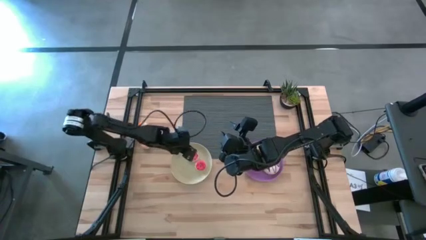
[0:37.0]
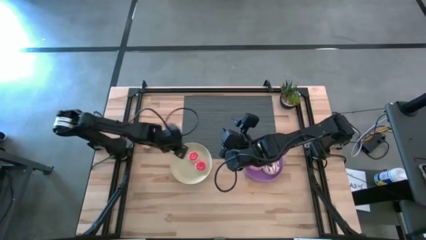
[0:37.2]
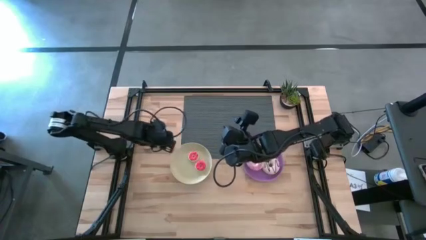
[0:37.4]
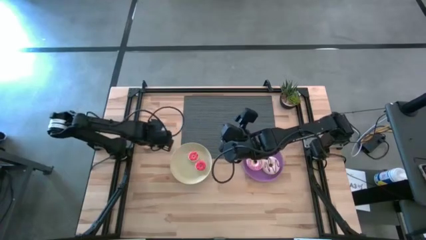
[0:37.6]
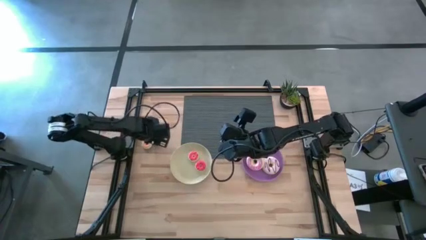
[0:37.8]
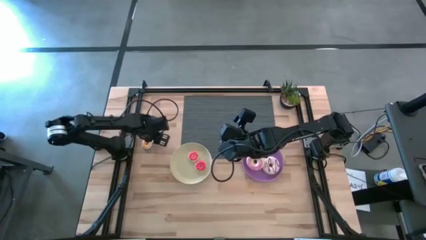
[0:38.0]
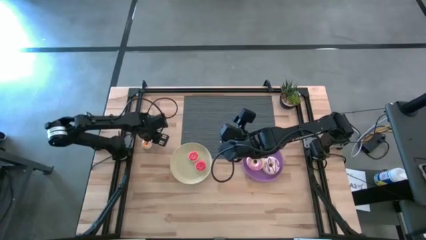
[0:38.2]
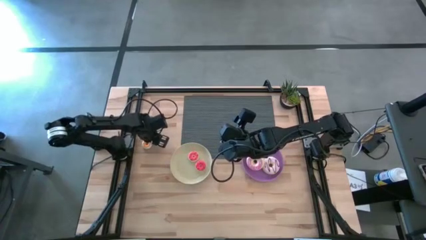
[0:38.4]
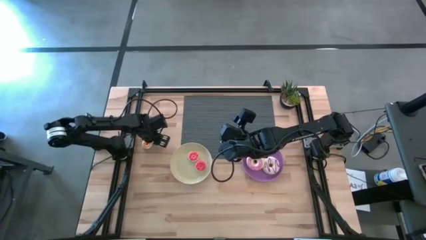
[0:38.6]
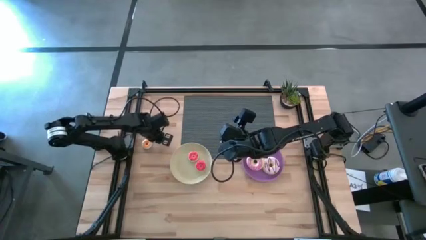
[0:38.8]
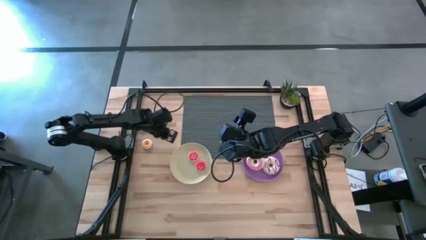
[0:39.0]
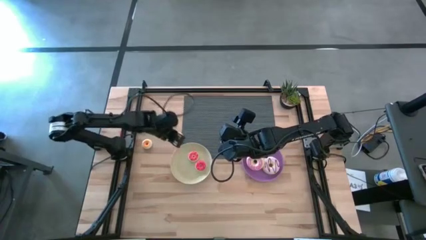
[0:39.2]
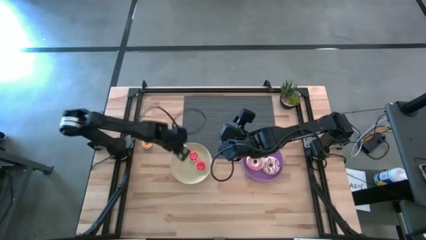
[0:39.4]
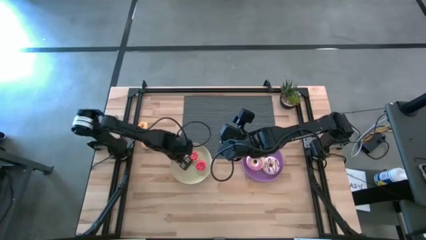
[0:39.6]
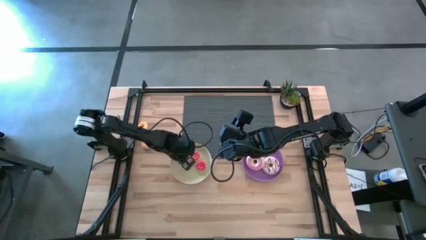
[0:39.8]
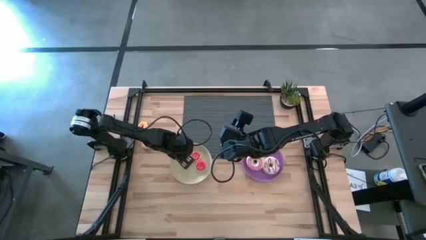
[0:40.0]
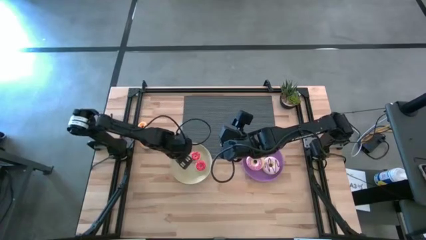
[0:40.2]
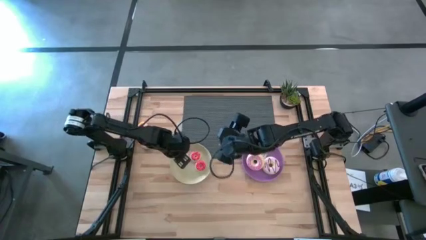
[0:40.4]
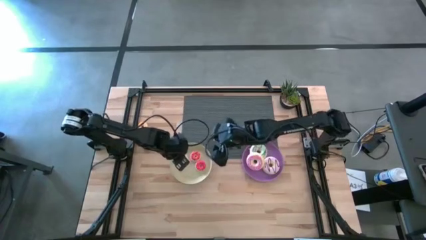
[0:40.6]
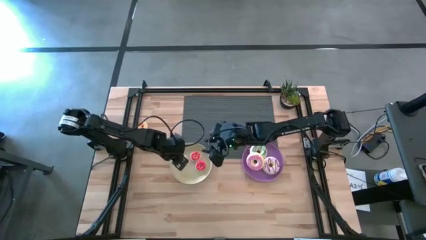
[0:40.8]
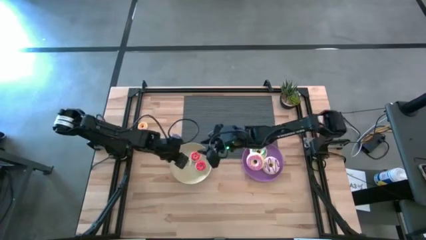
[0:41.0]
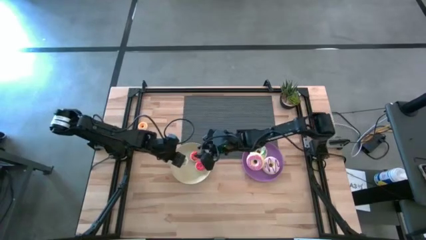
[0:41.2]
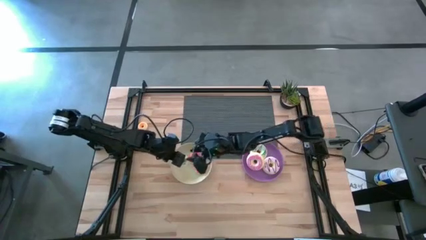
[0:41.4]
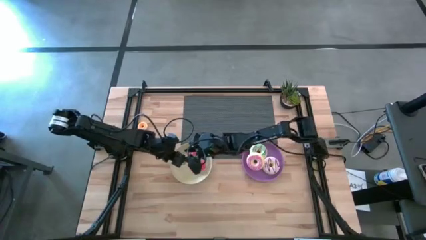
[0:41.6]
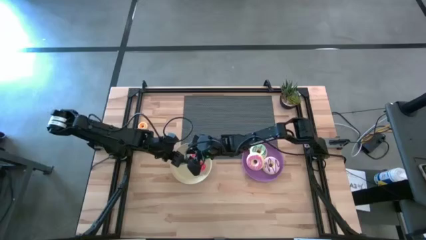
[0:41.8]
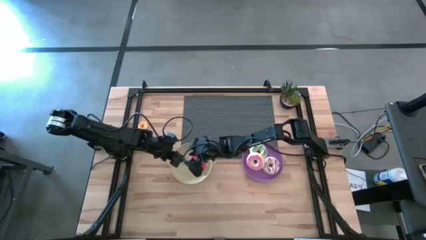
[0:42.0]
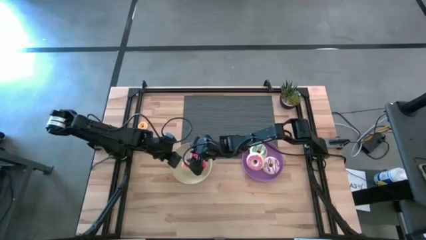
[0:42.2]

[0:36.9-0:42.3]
Task: Pick & Place donuts
Put the small white donut on the white plate

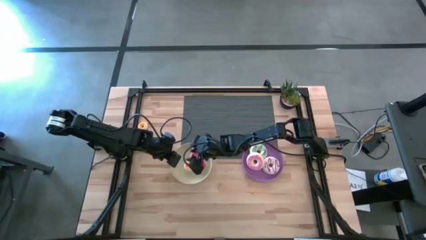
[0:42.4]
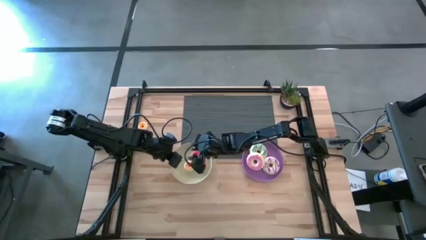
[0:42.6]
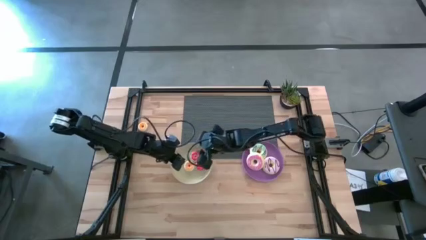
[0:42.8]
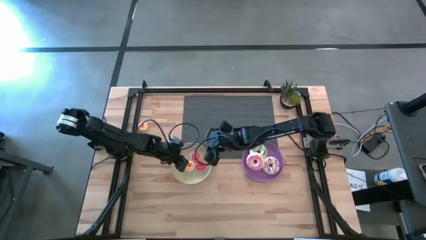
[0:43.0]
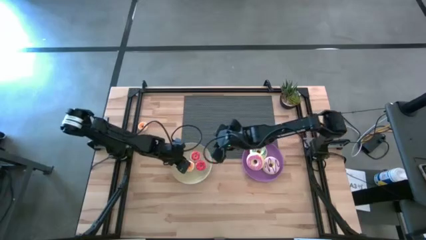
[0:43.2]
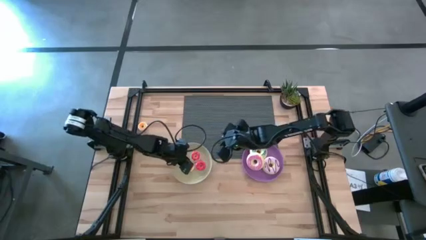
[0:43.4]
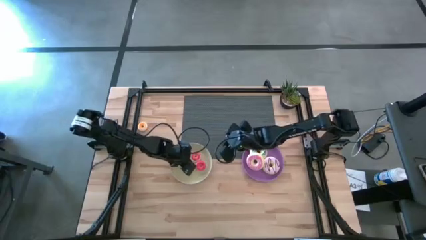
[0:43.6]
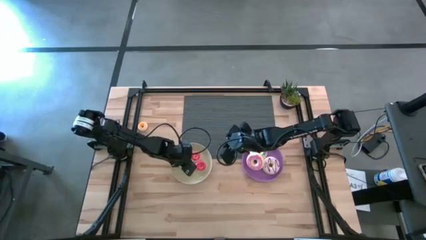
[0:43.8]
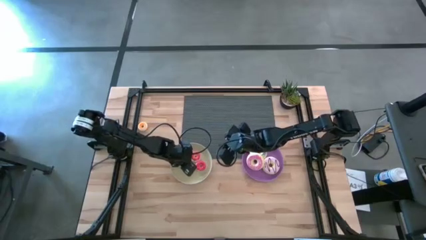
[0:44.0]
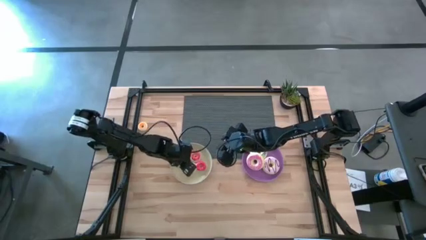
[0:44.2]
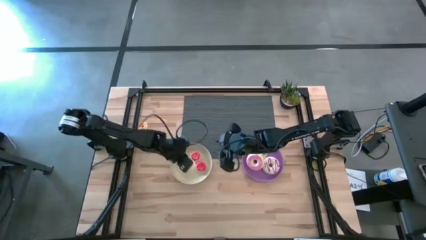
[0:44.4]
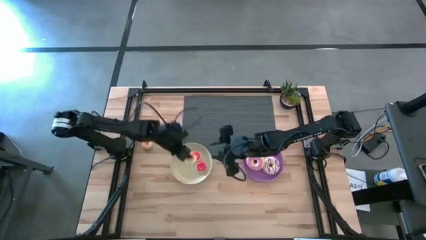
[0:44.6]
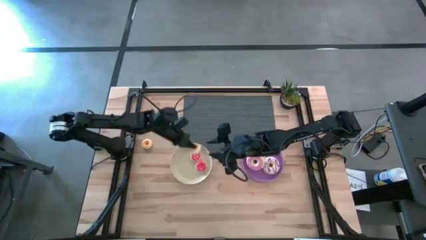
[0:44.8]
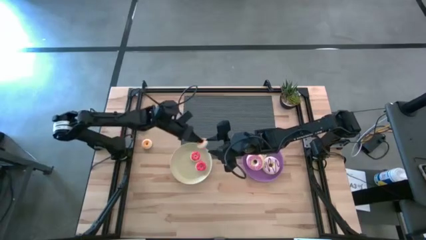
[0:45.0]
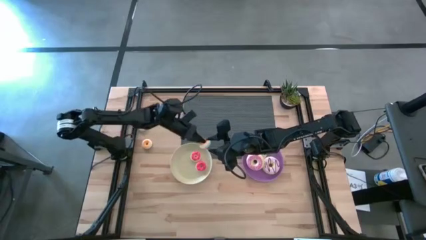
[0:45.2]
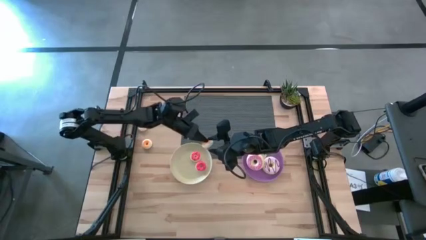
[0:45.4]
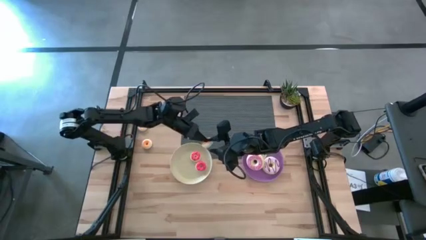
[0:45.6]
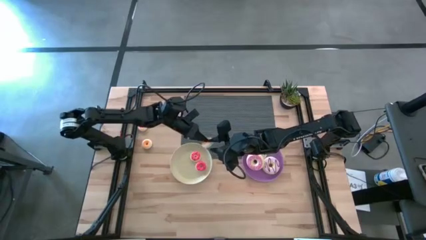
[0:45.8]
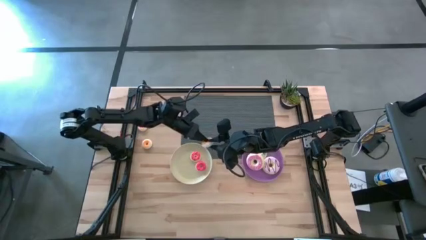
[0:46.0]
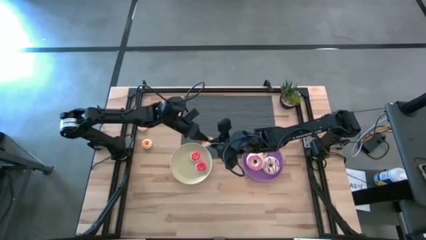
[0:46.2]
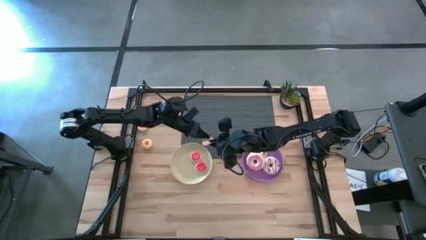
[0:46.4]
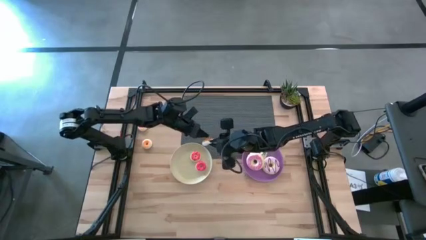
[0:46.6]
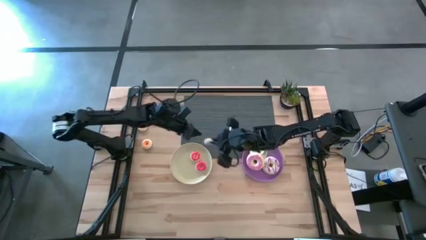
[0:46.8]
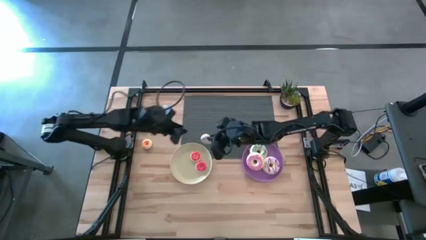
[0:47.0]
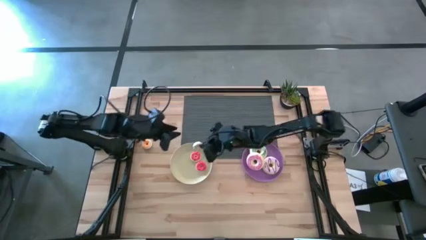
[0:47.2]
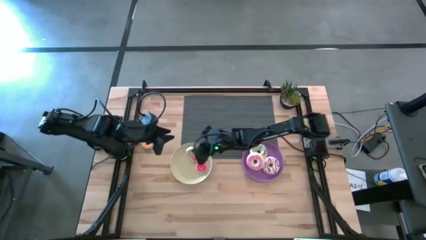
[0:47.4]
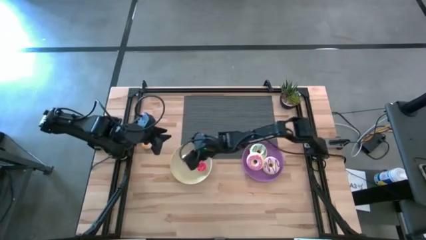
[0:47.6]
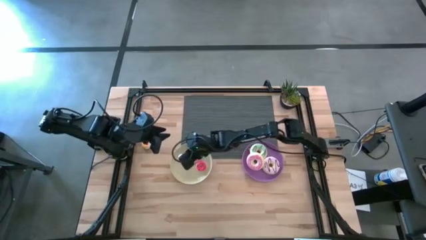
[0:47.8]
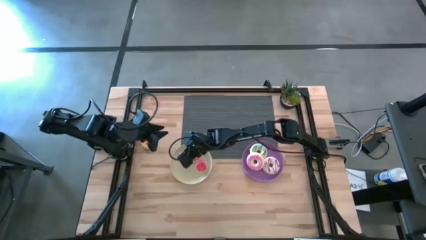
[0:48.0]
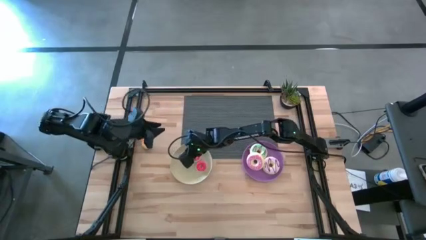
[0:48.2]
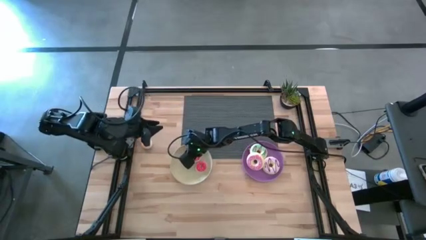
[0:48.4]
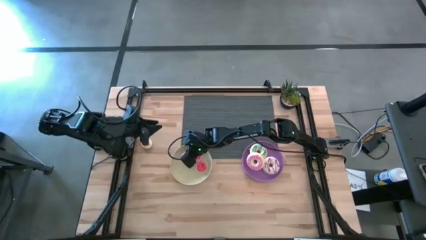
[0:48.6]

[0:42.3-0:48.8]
Put the small white donut on the white plate

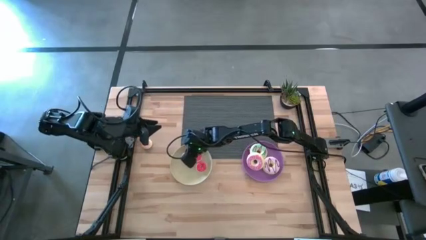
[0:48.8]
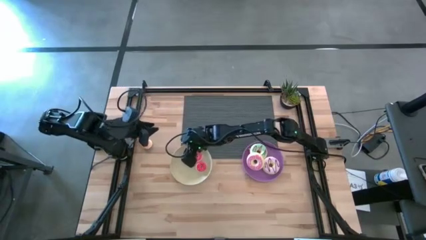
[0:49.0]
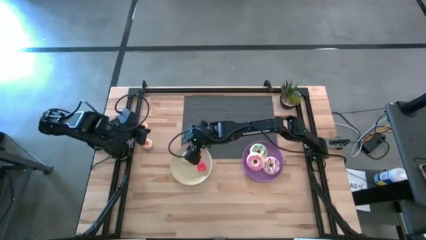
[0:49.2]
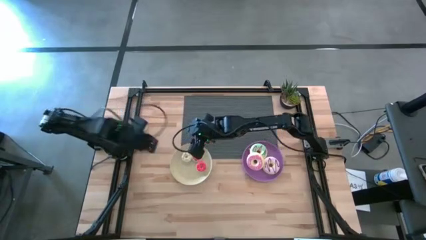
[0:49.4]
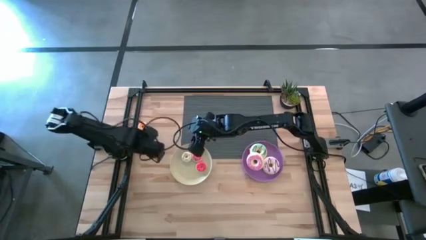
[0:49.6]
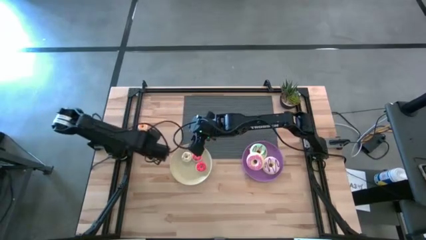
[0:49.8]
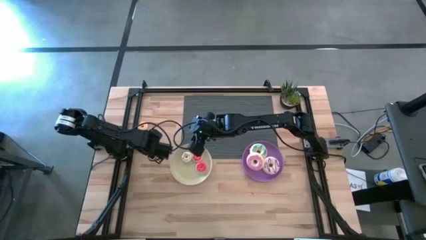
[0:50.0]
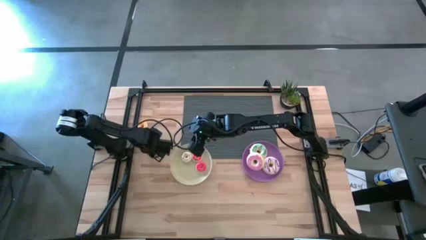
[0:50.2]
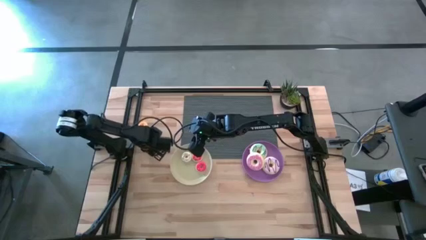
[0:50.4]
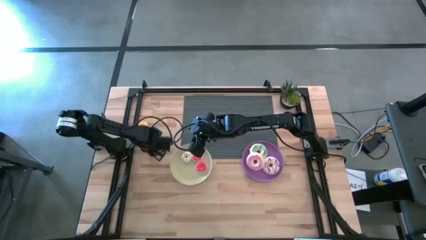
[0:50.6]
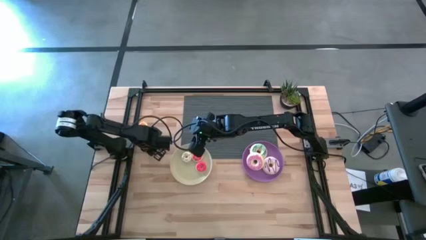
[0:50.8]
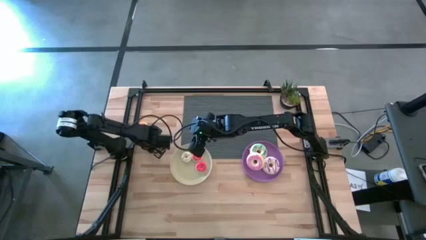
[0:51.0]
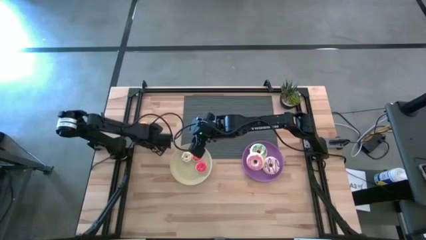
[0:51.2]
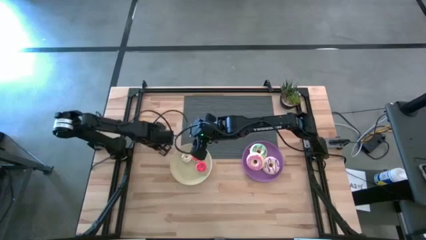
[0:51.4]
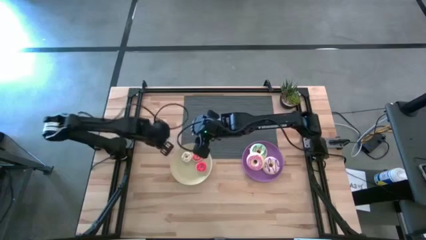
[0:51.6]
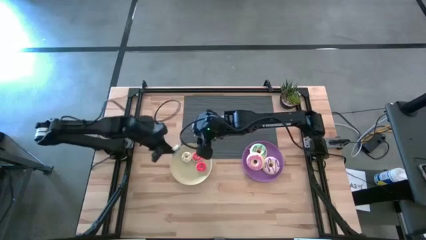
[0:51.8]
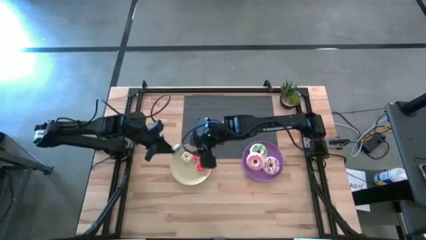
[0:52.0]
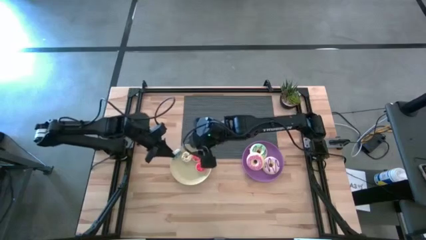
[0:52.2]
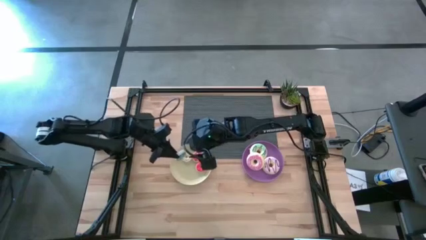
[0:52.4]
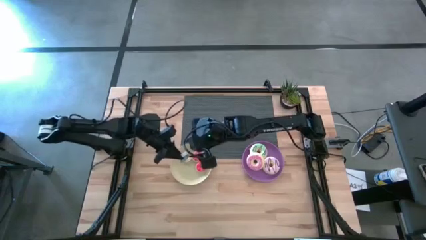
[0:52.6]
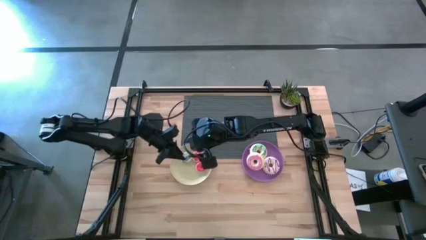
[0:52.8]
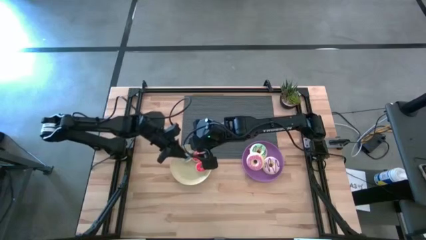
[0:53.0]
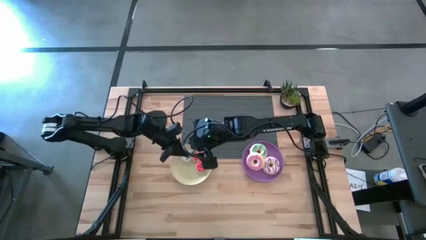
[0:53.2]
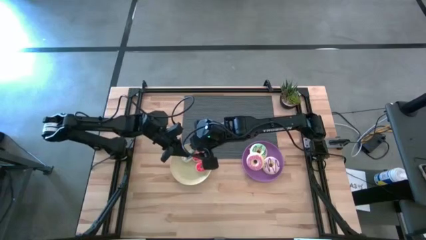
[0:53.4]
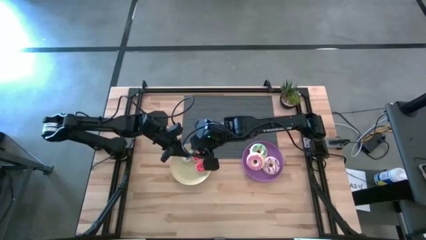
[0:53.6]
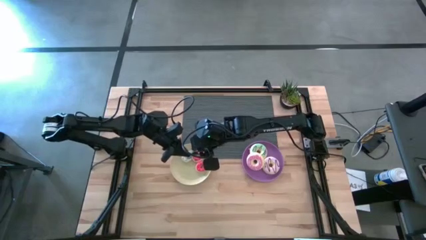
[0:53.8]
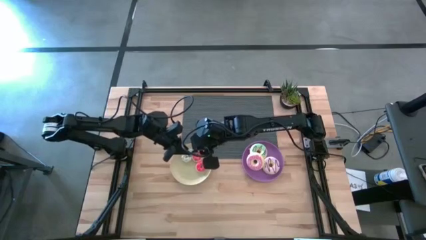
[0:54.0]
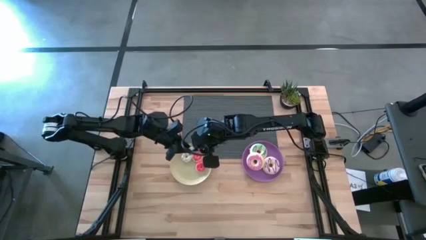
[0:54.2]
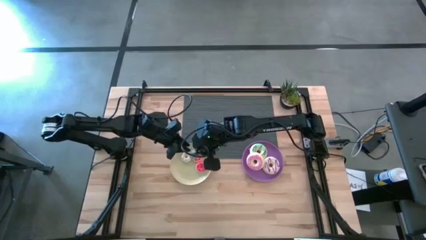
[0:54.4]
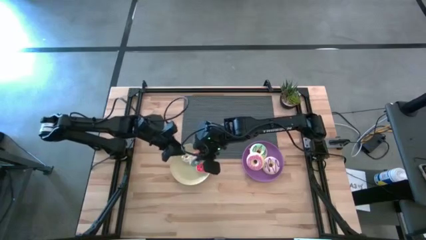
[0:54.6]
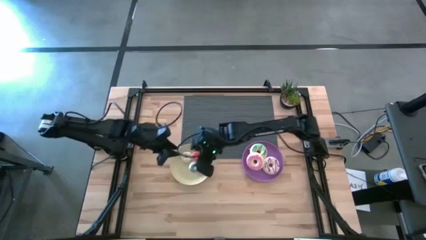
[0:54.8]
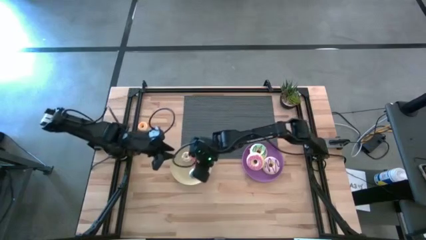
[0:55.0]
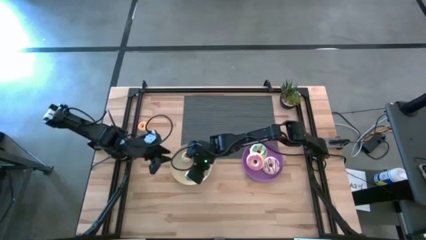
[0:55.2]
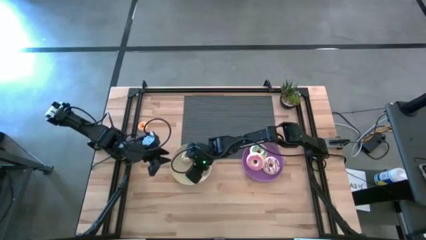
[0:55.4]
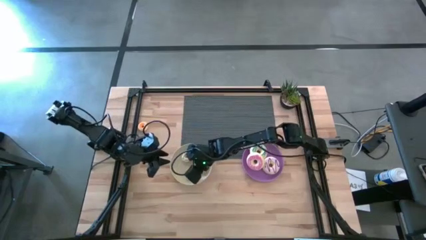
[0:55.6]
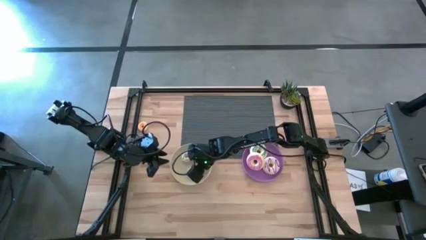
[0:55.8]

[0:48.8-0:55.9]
Put the small blue donut on the white plate
